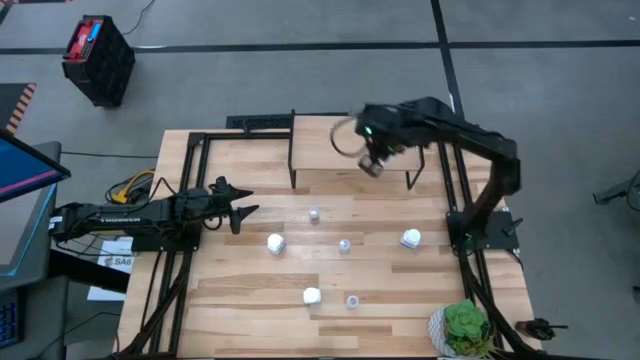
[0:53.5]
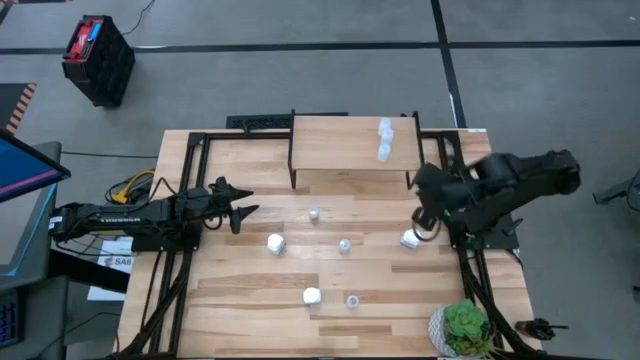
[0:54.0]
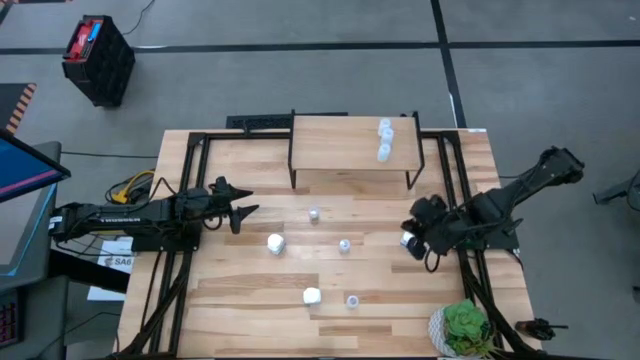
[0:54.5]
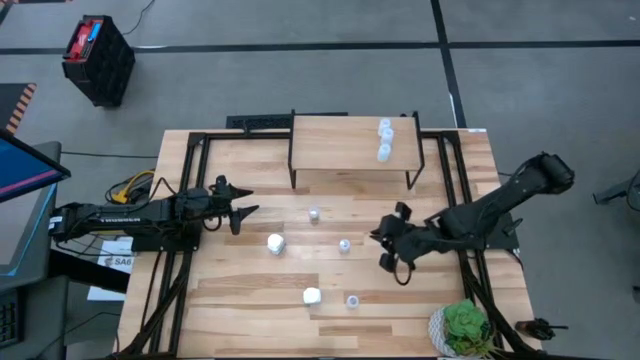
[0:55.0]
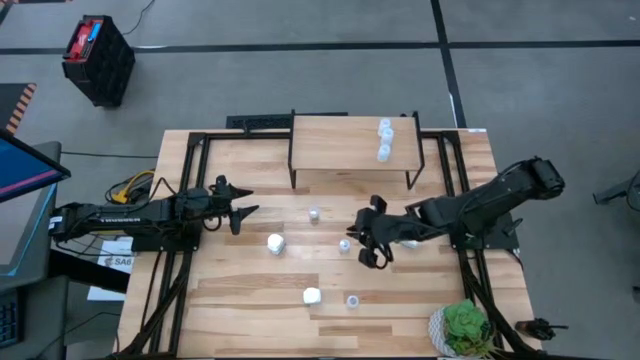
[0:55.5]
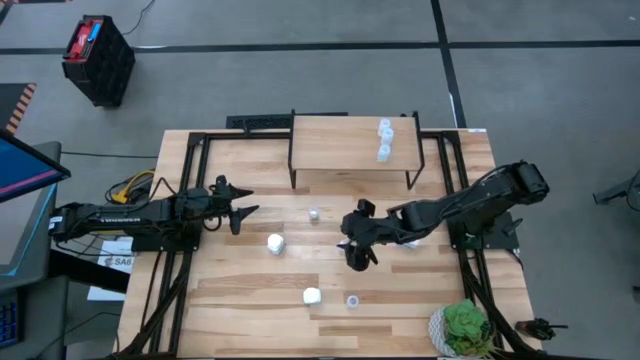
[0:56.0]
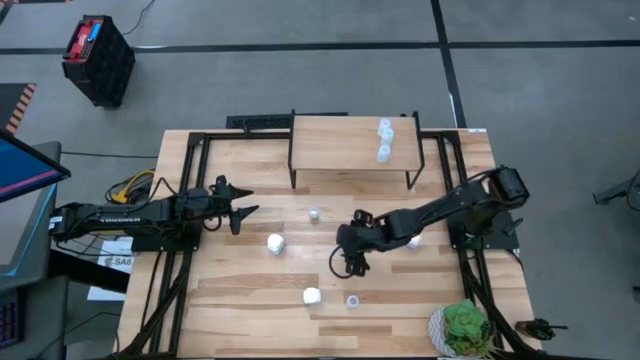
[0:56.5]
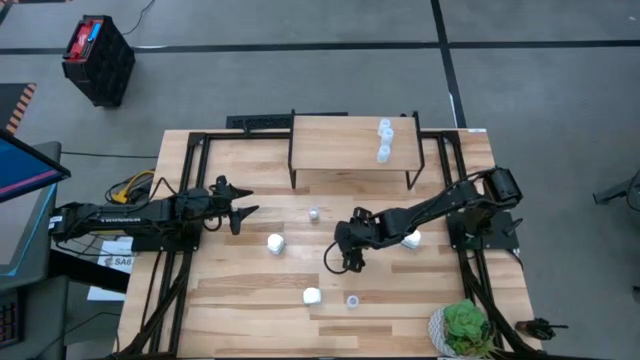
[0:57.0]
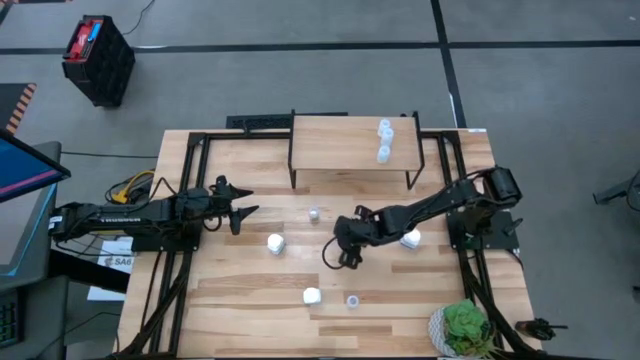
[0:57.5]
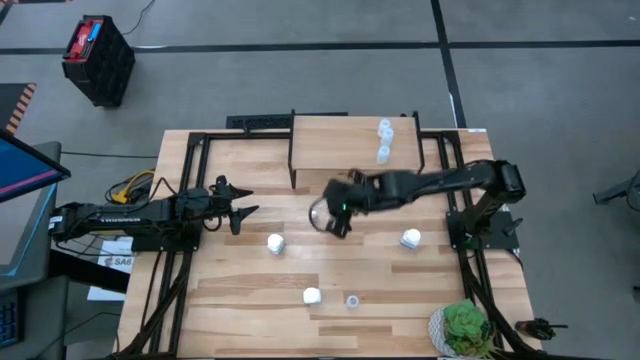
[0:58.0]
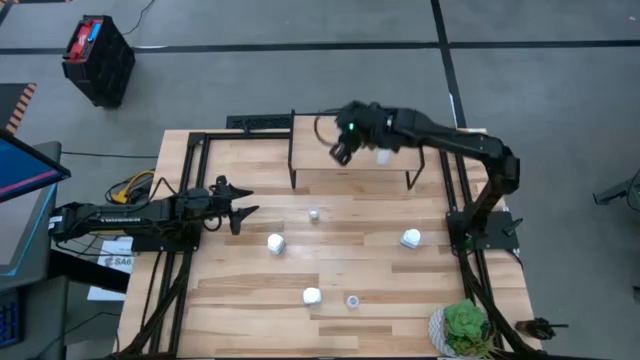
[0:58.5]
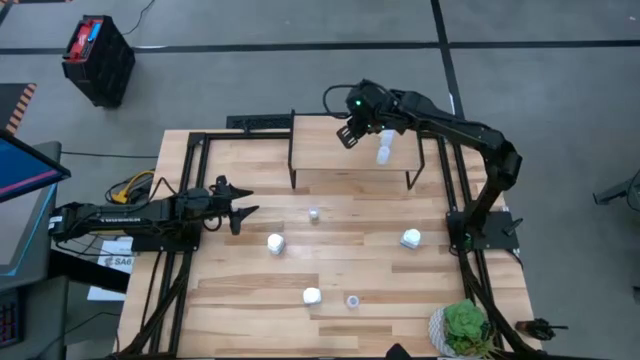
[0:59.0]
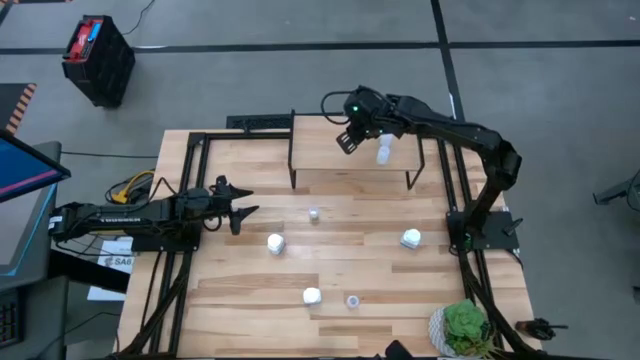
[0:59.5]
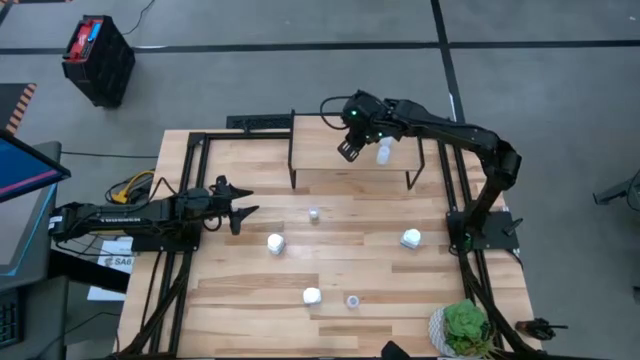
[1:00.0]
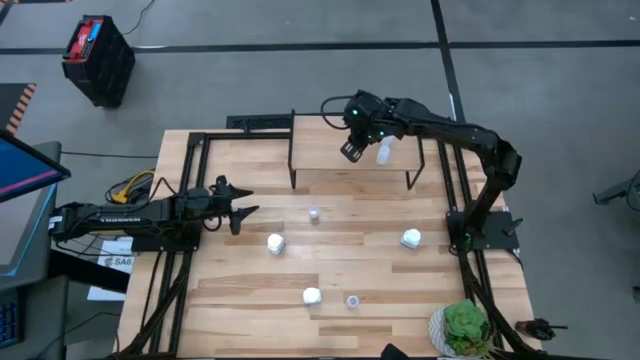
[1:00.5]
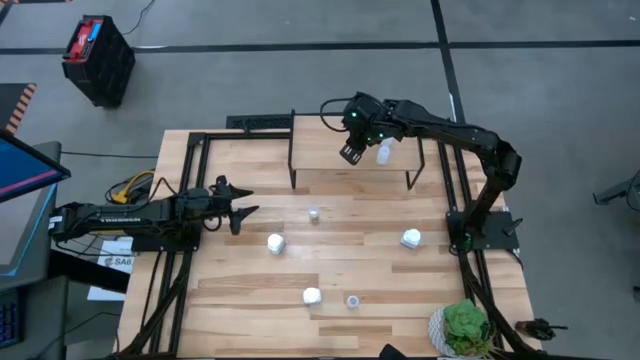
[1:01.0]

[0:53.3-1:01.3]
Task: Pick and place medicine bottles onto shelf by color
Put the middle transparent pill bottle on the shelf

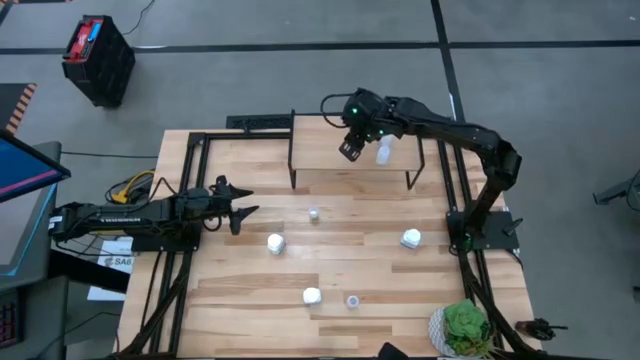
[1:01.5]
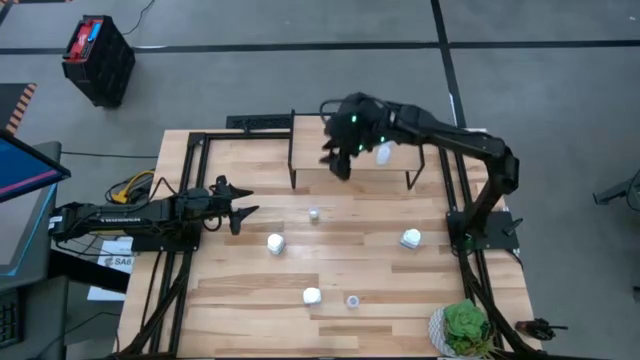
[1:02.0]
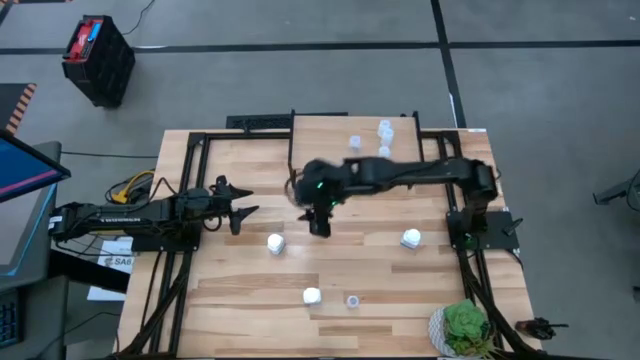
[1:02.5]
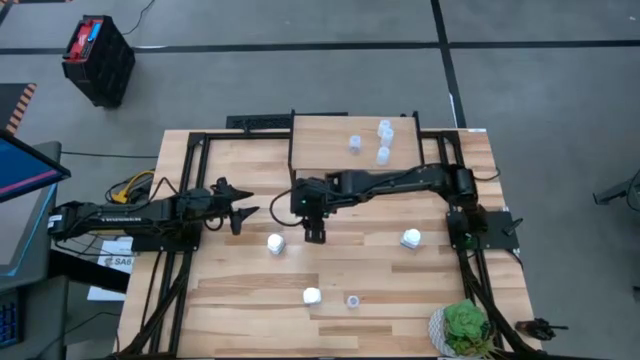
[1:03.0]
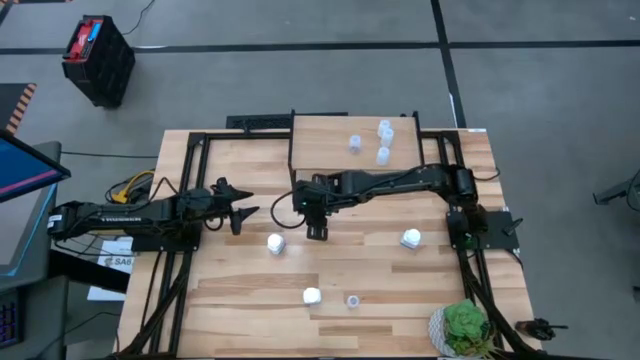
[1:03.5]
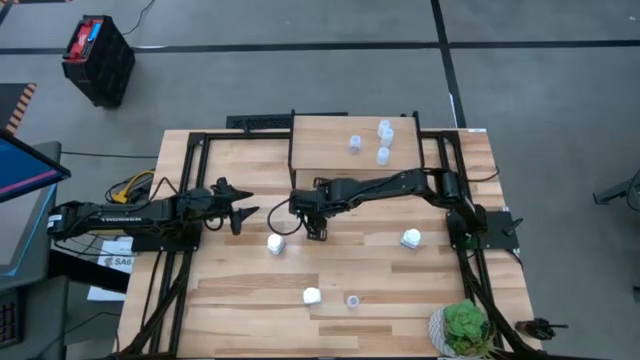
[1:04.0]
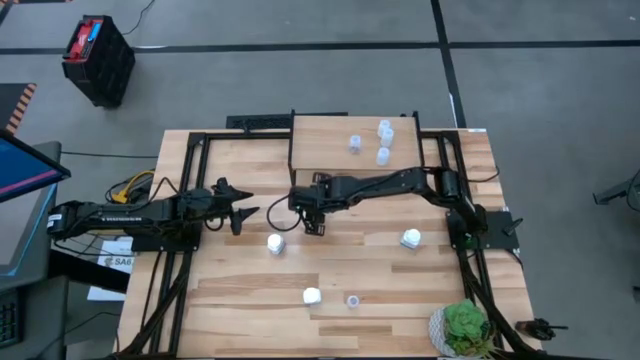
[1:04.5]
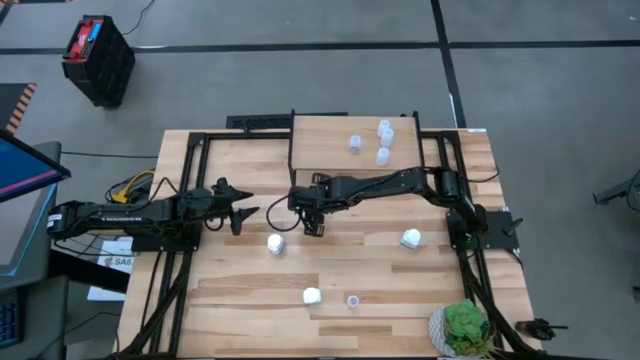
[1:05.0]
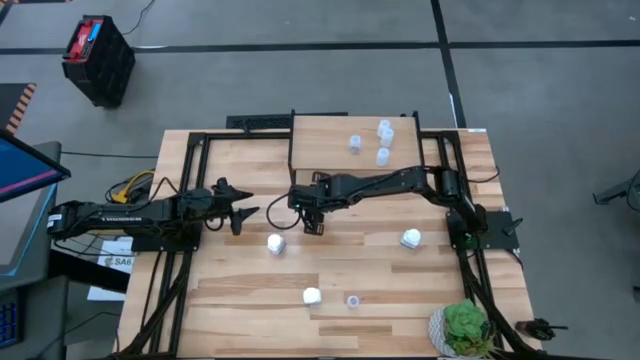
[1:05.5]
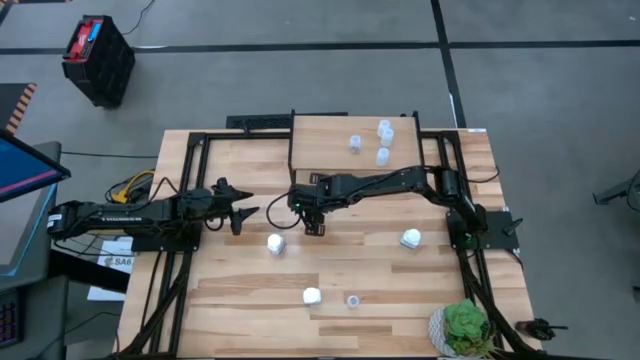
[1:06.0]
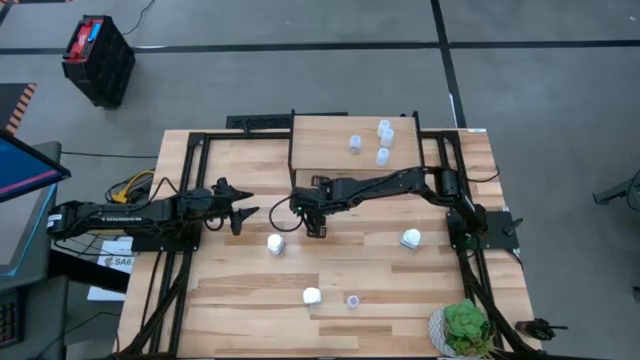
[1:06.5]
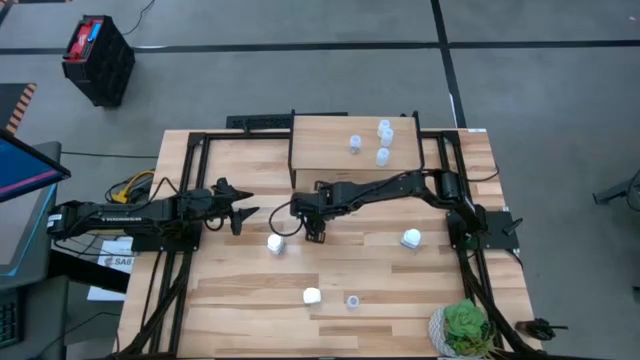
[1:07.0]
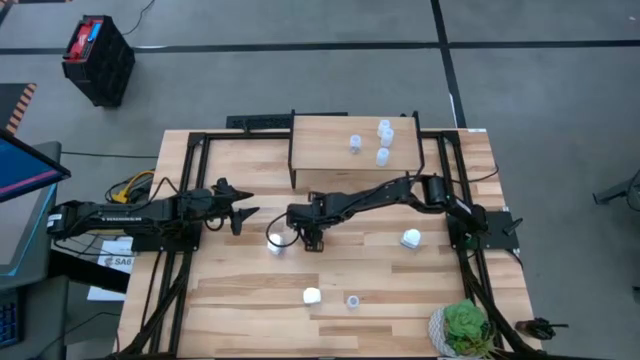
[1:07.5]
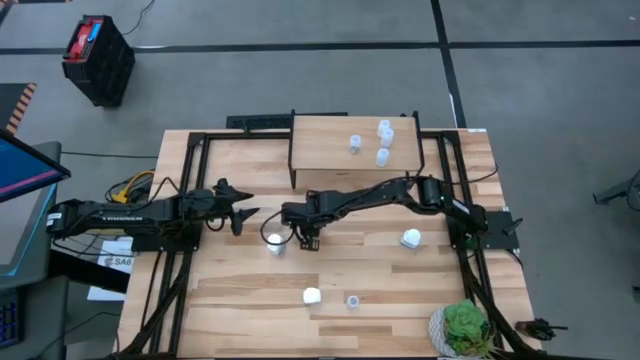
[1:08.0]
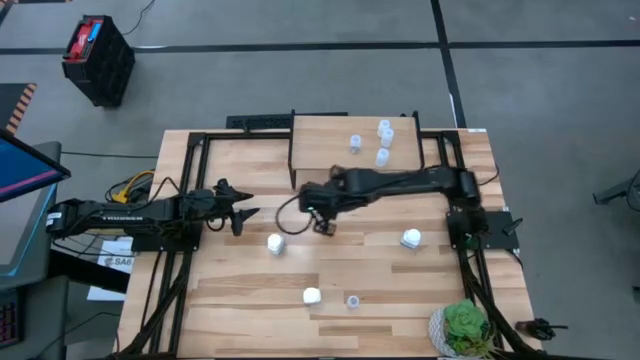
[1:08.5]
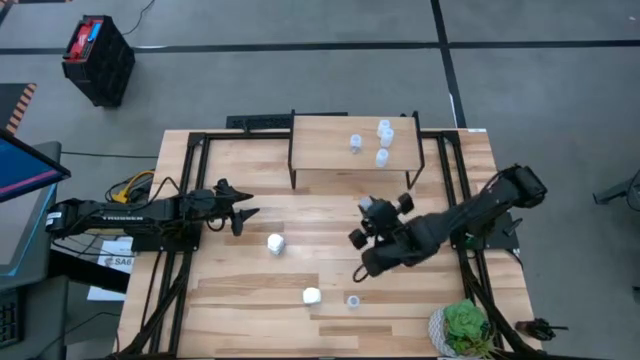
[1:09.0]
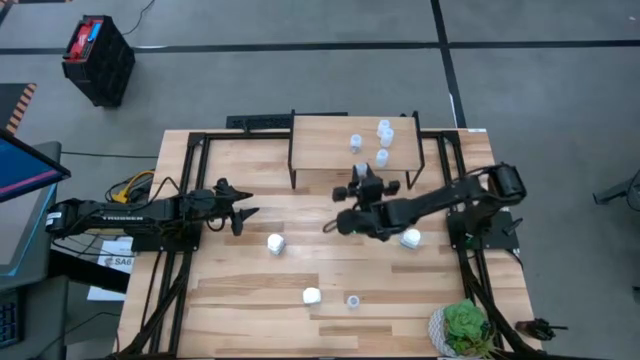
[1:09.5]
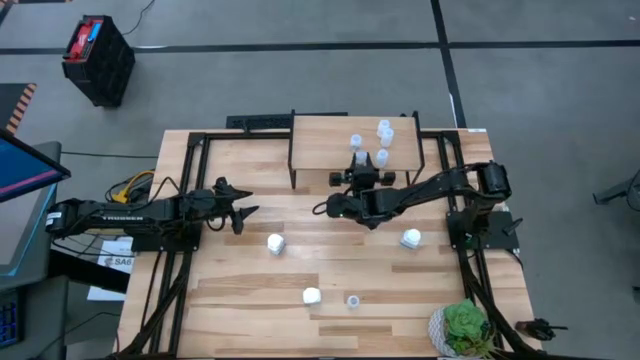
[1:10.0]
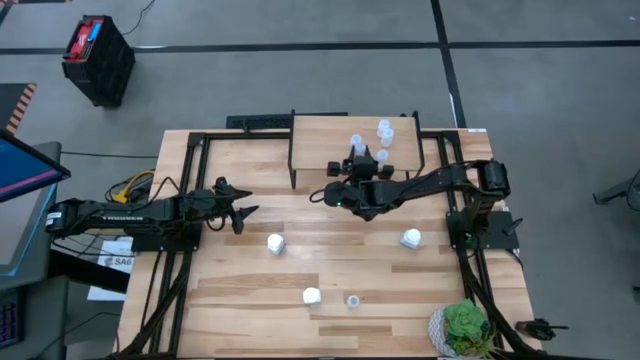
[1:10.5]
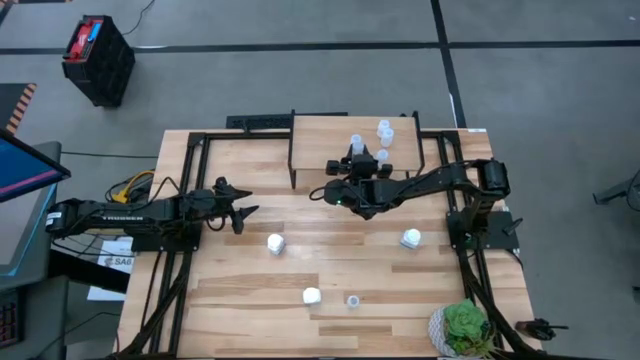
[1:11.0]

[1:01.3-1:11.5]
Put the top transparent pill bottle on the shelf

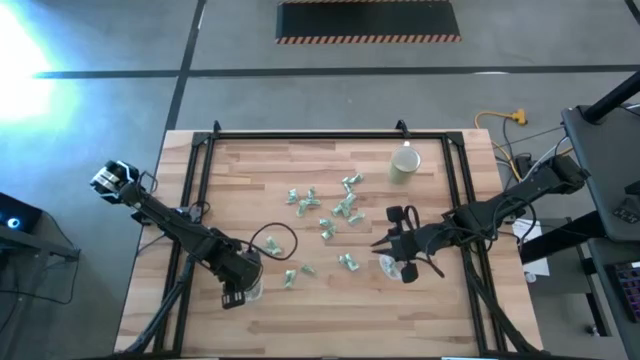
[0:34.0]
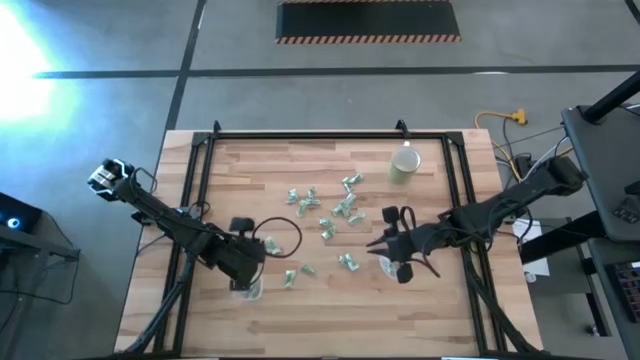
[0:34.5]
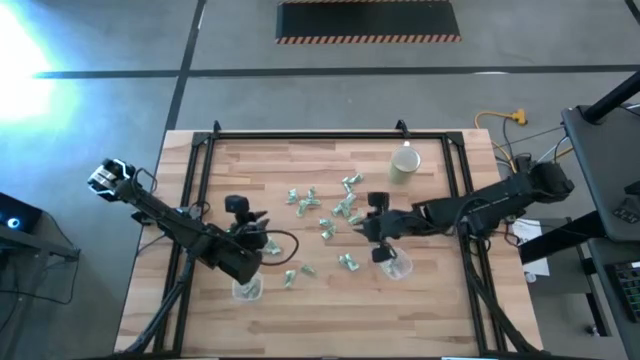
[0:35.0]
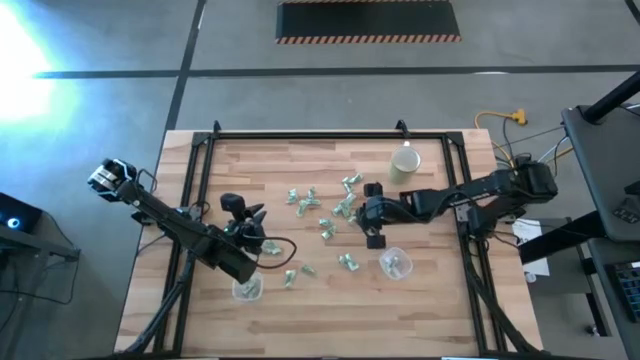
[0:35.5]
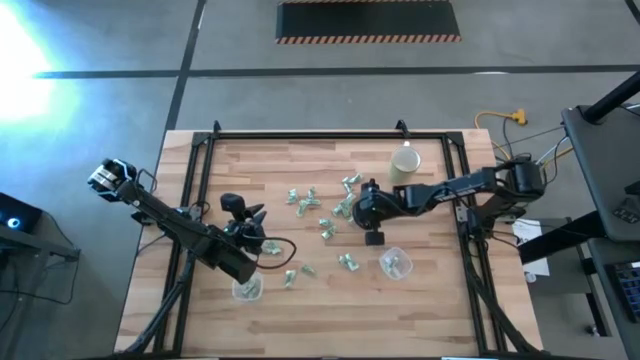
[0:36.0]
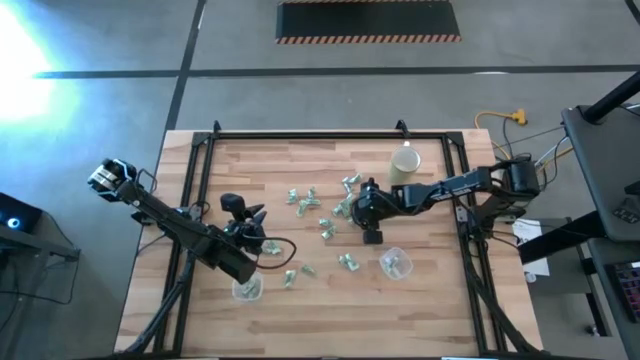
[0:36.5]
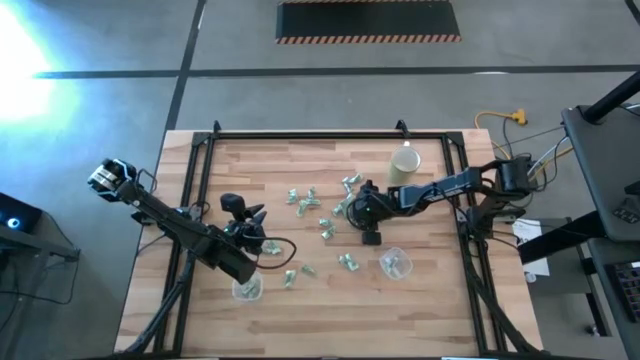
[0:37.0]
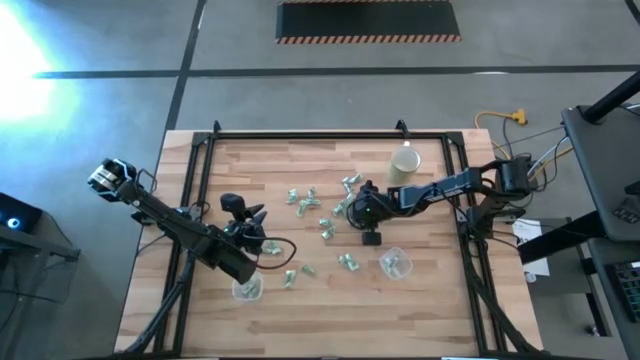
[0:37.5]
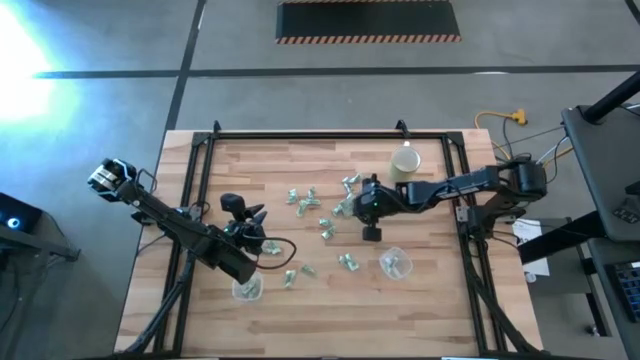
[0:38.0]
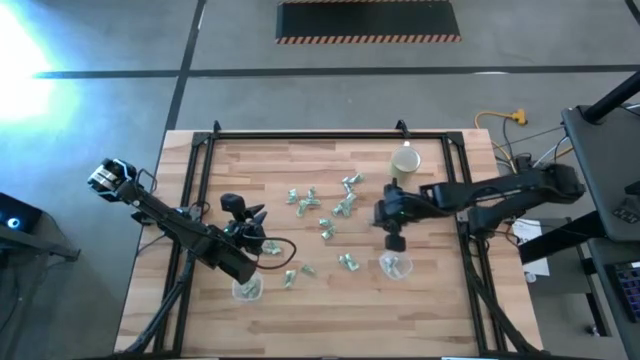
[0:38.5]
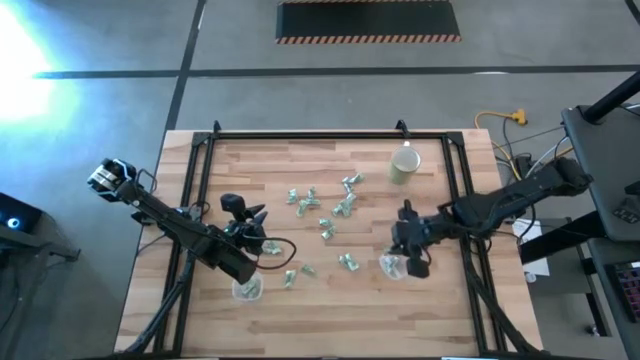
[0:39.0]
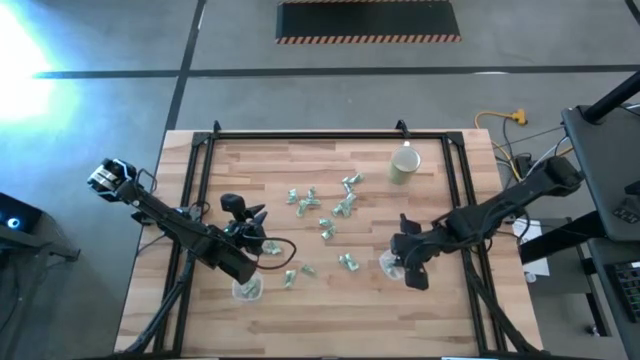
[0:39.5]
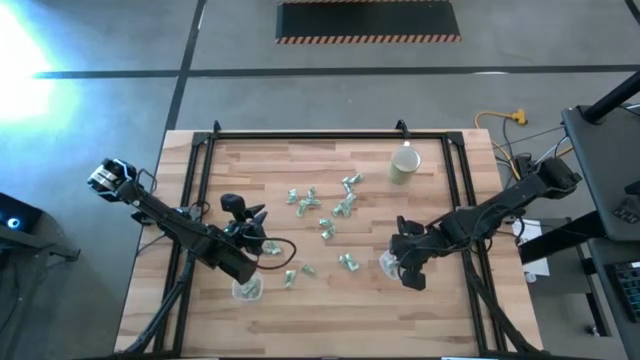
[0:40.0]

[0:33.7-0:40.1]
Task: Pick and place Stevia / Truvia into bins
Put the stevia packet into the right transparent container
